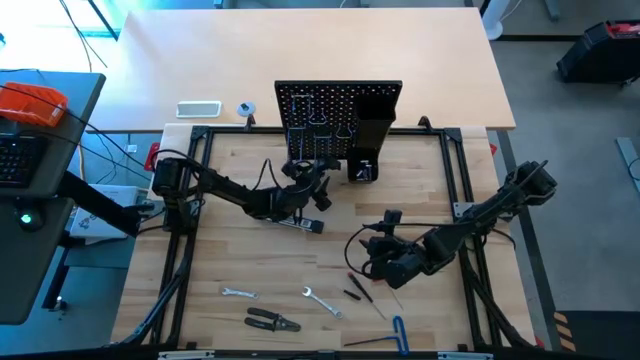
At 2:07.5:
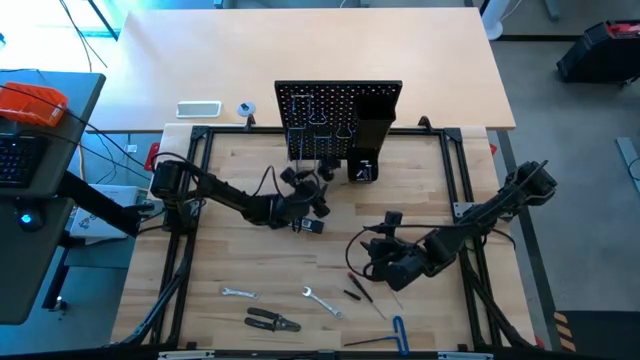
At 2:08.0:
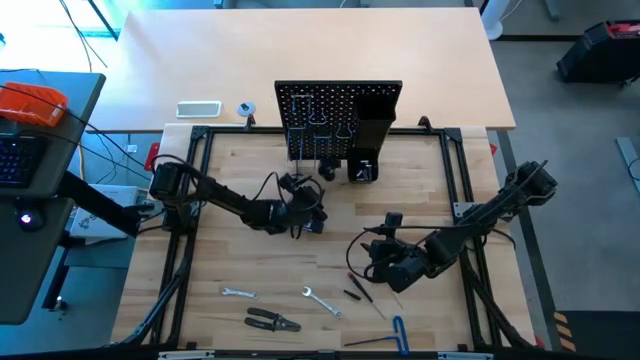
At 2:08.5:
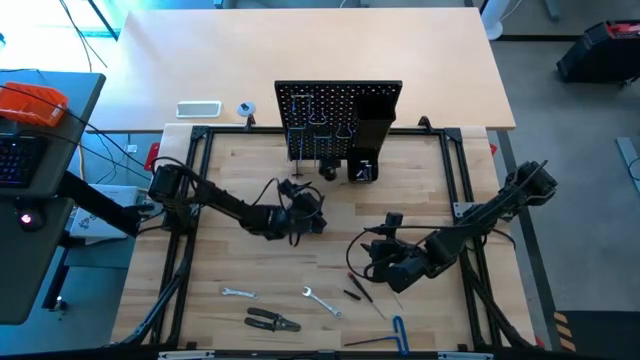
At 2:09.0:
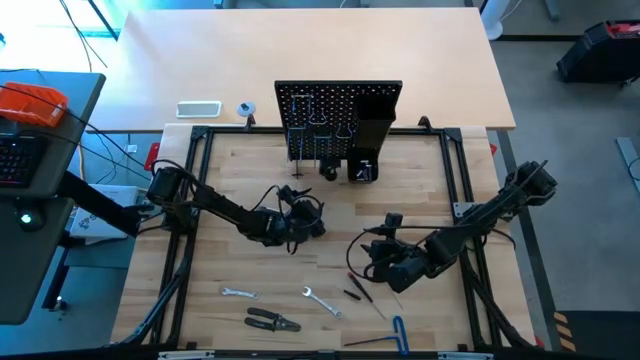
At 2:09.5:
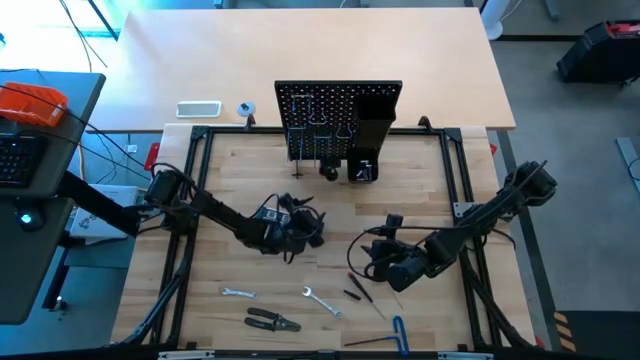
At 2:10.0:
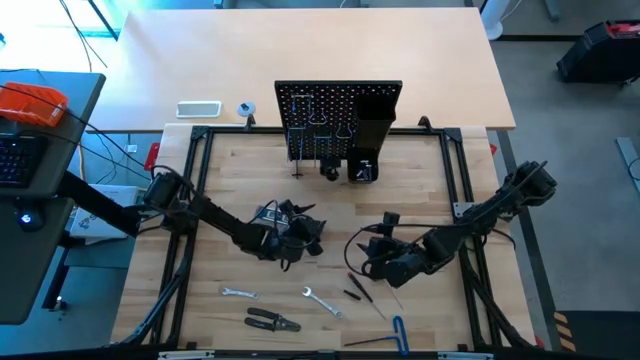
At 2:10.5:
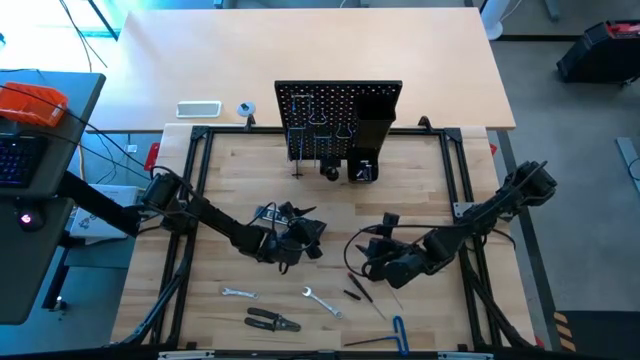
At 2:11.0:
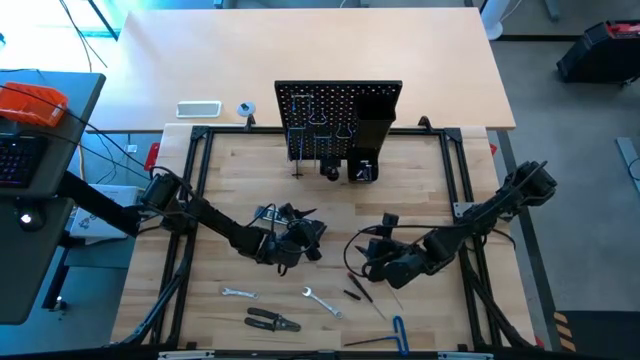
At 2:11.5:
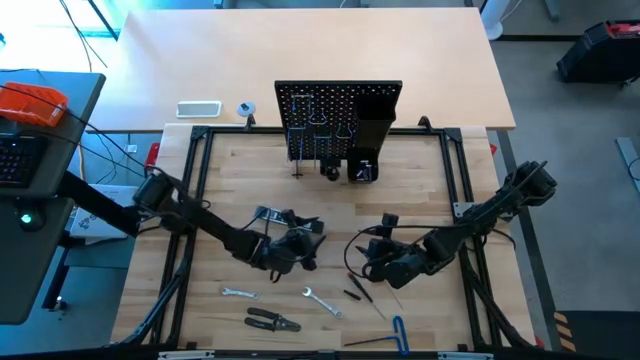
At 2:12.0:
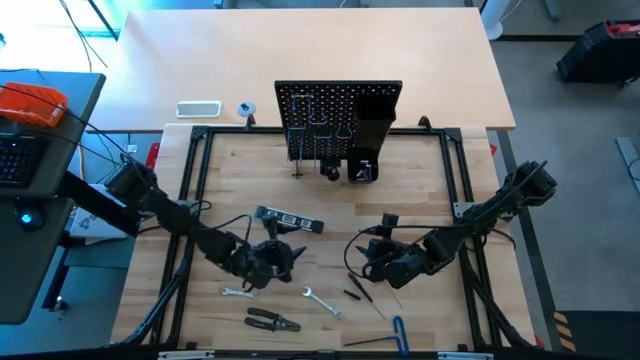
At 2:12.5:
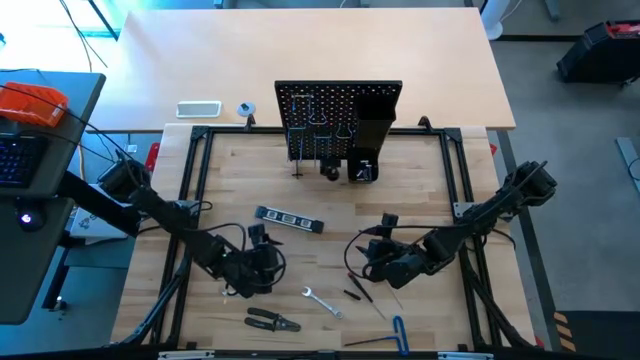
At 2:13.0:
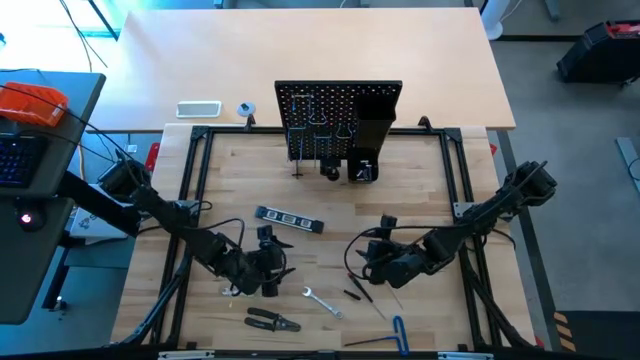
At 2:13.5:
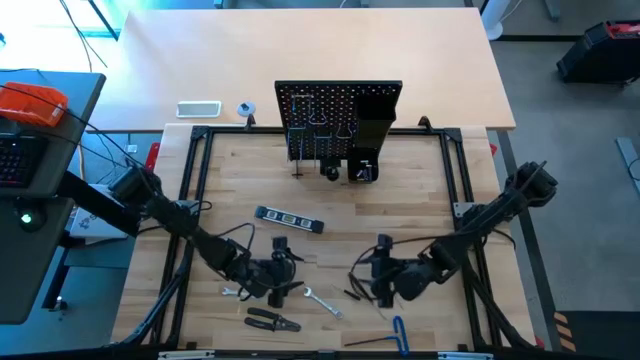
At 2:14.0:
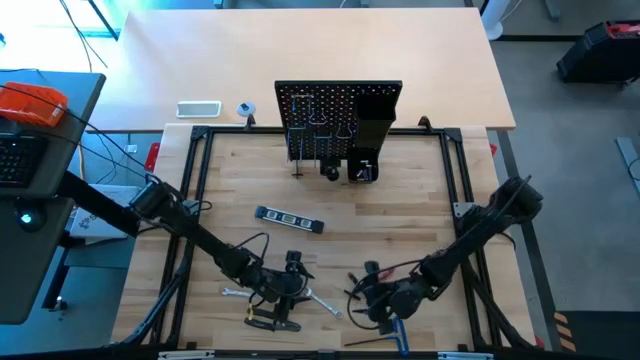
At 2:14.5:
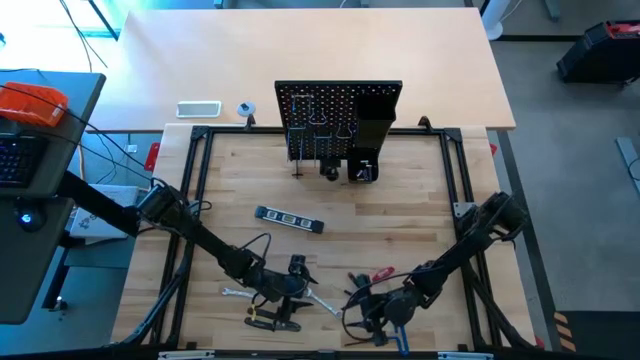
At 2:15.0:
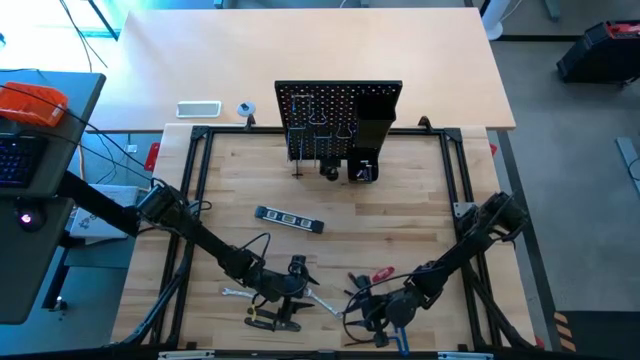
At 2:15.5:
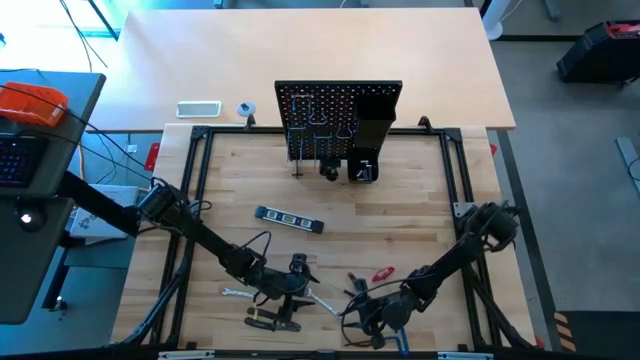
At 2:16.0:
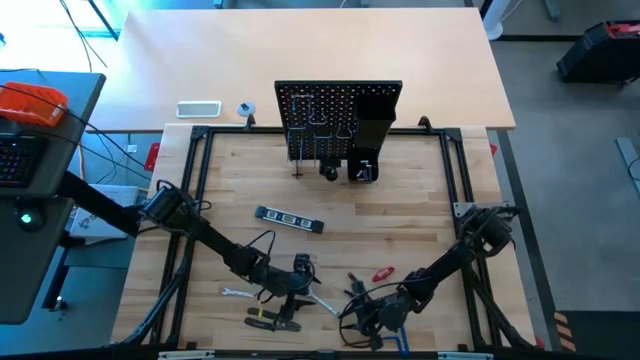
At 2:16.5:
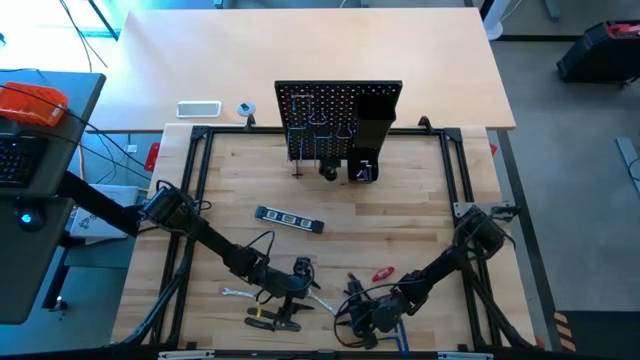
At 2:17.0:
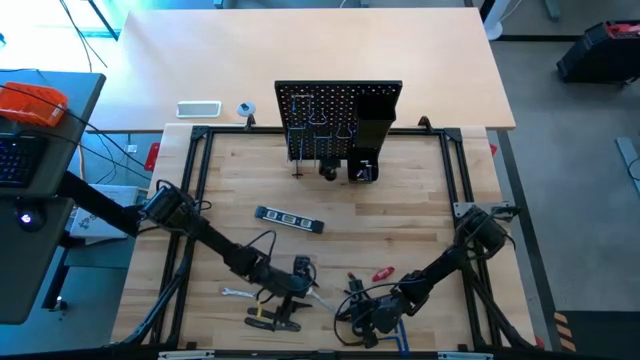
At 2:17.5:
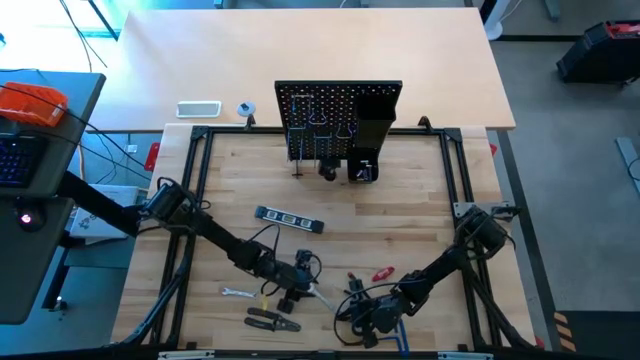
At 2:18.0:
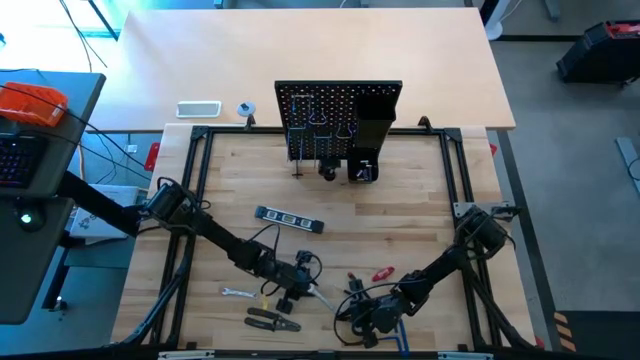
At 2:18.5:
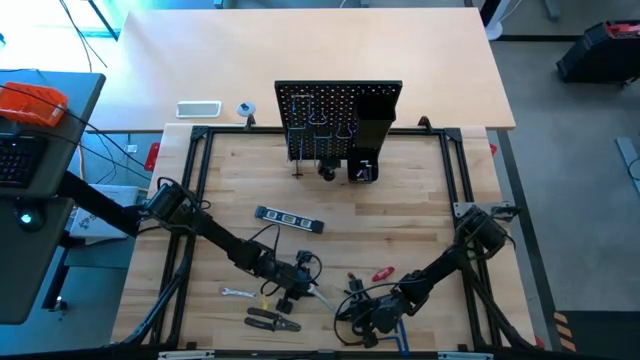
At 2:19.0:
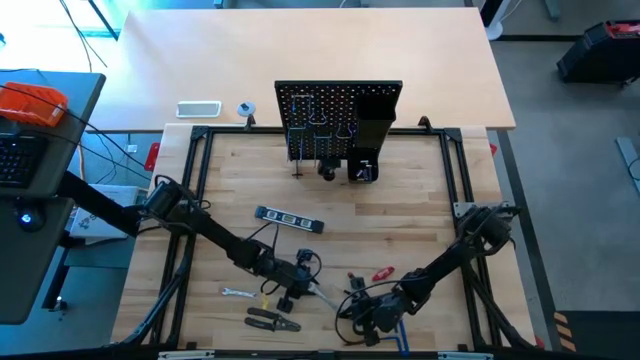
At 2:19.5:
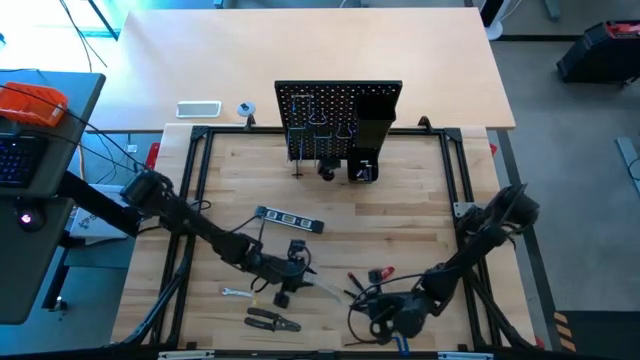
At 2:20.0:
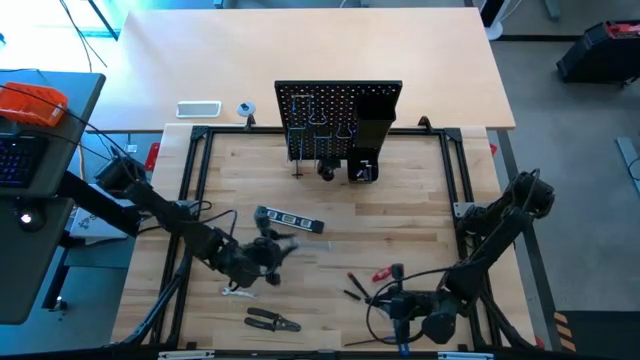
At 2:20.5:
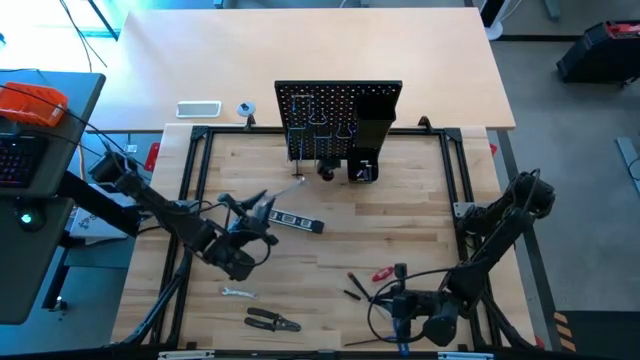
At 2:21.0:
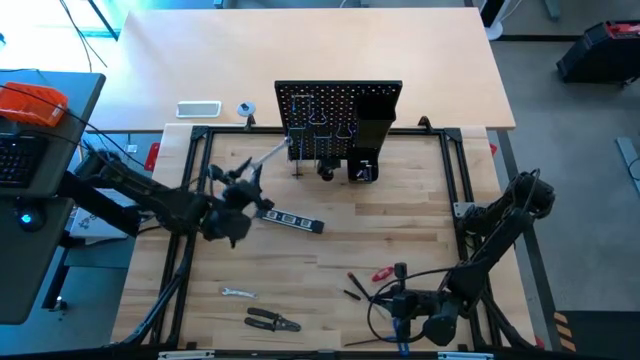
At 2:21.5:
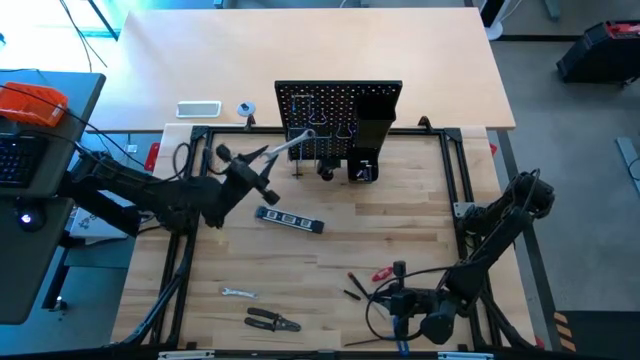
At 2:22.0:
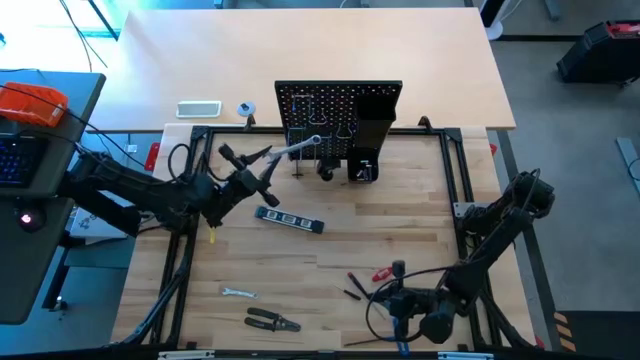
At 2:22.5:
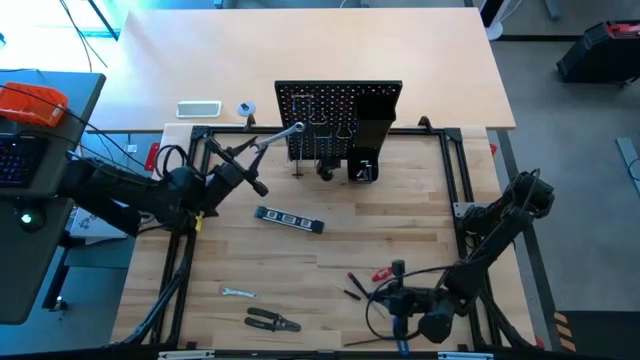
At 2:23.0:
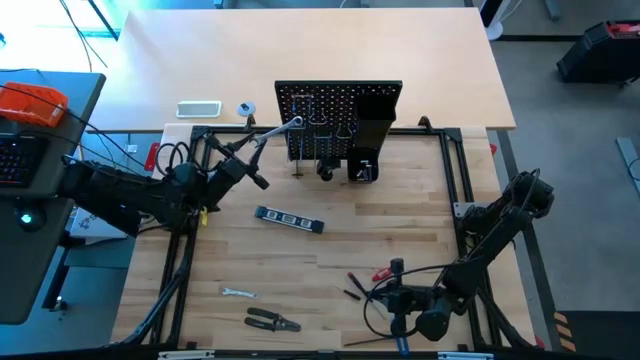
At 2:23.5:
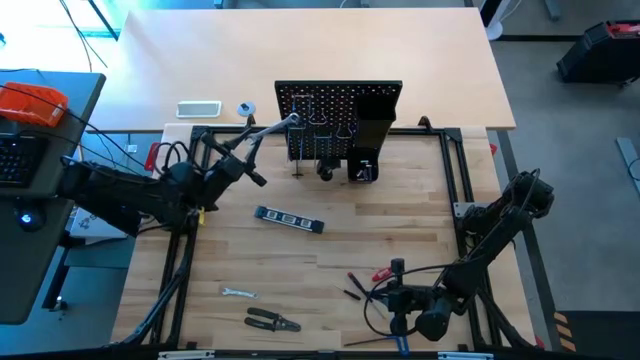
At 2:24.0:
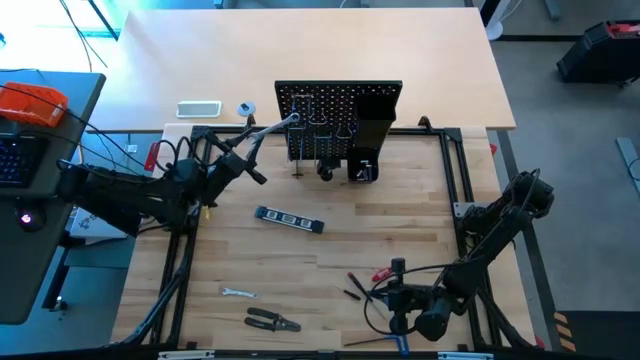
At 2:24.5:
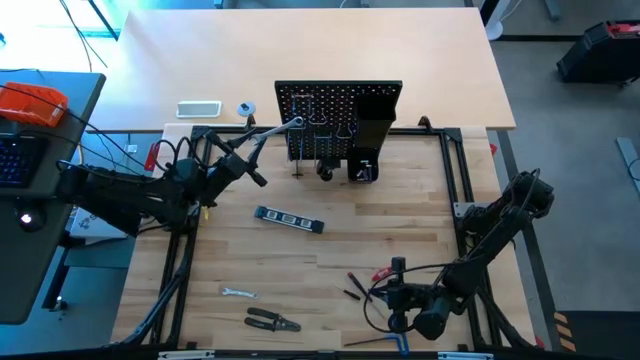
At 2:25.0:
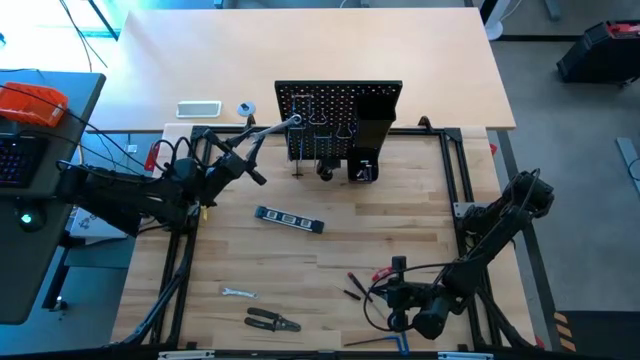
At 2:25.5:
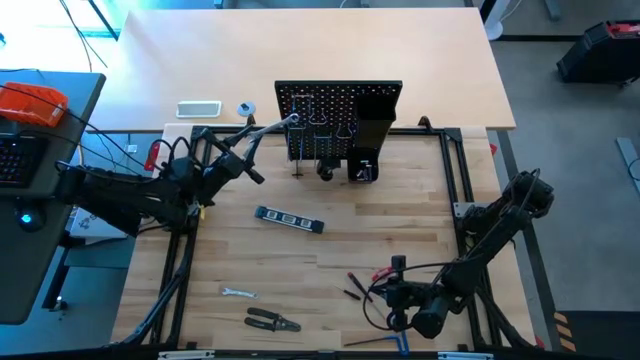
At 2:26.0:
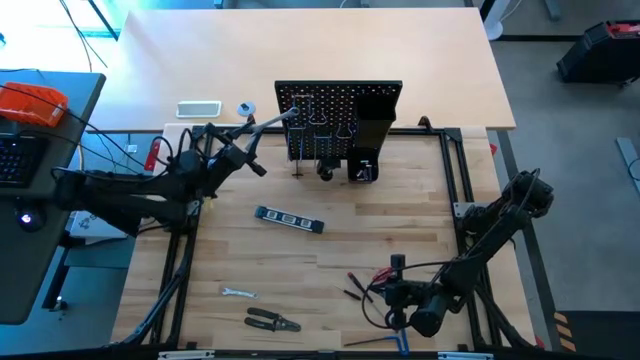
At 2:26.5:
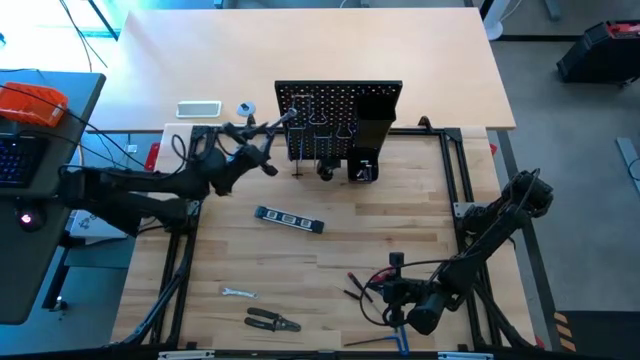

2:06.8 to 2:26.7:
Task: Hang tools onto peg board
Hang the big wrench onto the peg board
